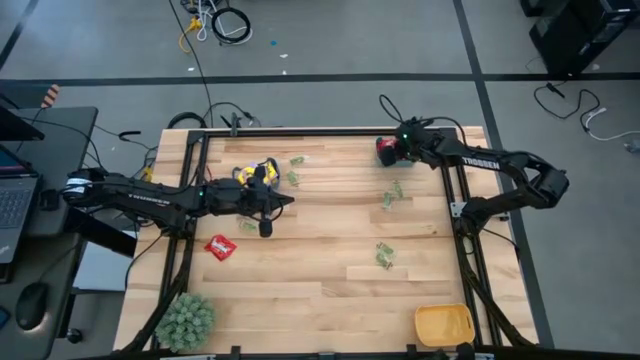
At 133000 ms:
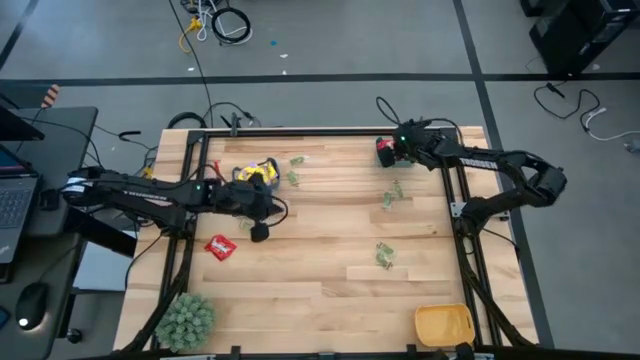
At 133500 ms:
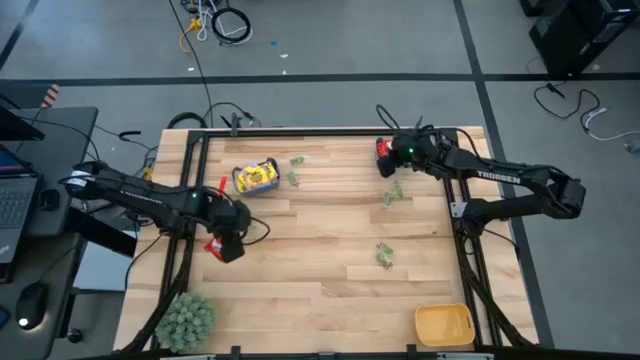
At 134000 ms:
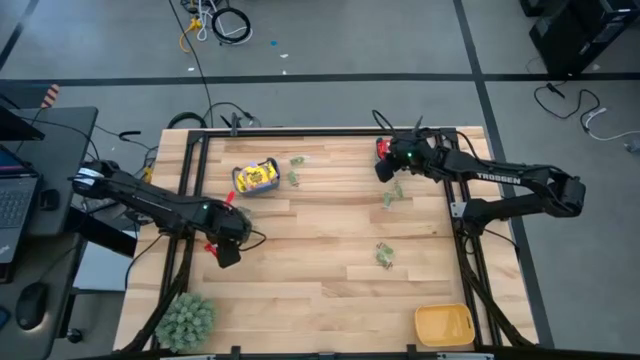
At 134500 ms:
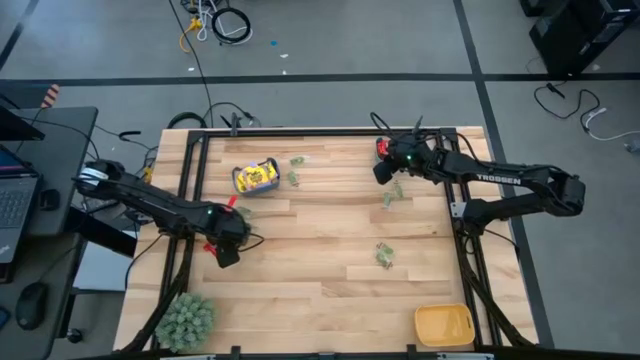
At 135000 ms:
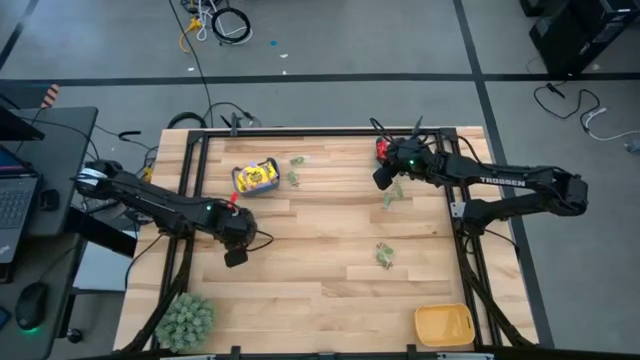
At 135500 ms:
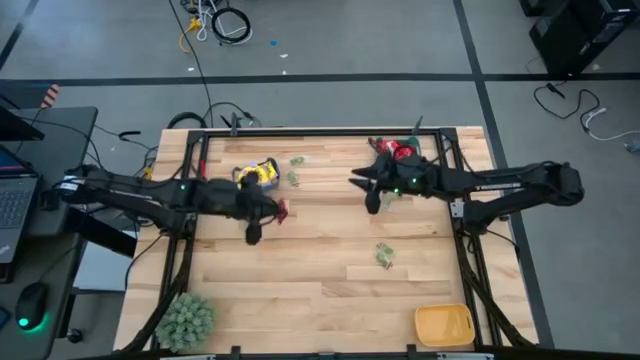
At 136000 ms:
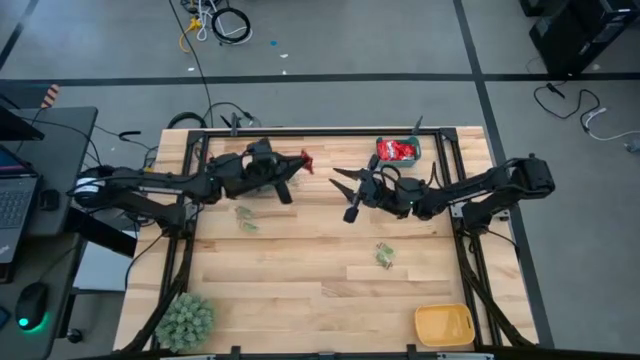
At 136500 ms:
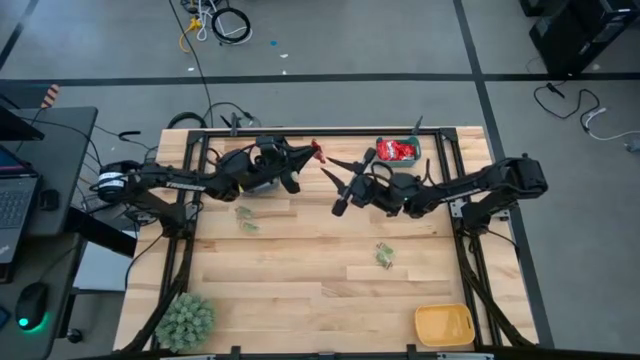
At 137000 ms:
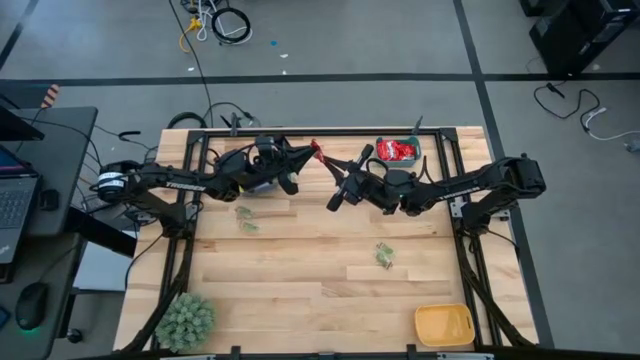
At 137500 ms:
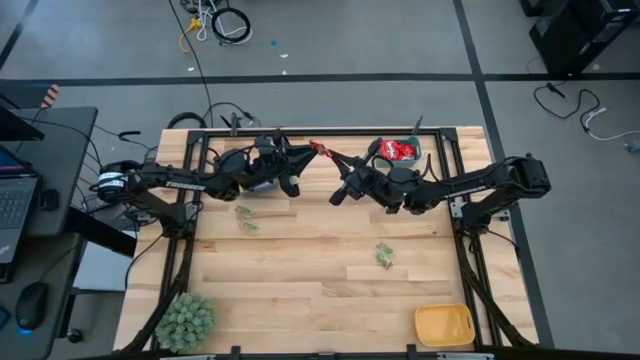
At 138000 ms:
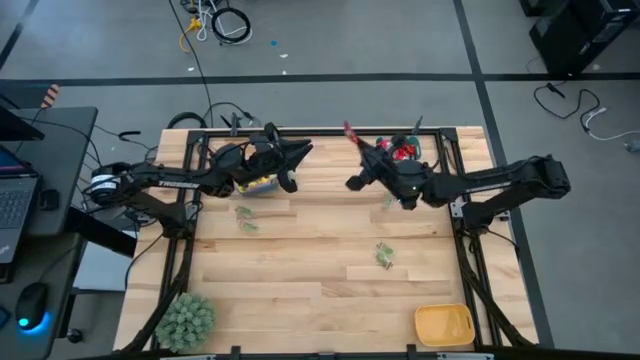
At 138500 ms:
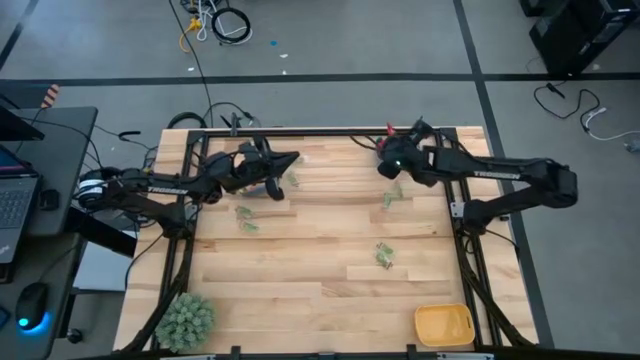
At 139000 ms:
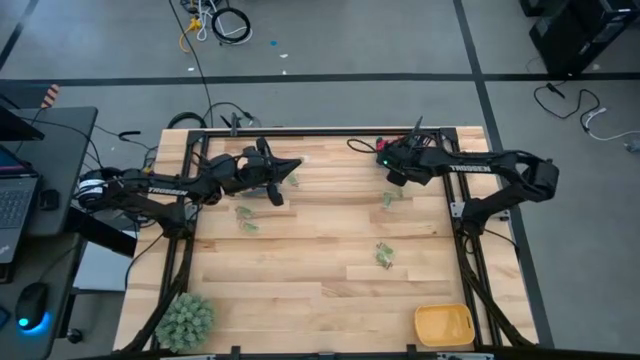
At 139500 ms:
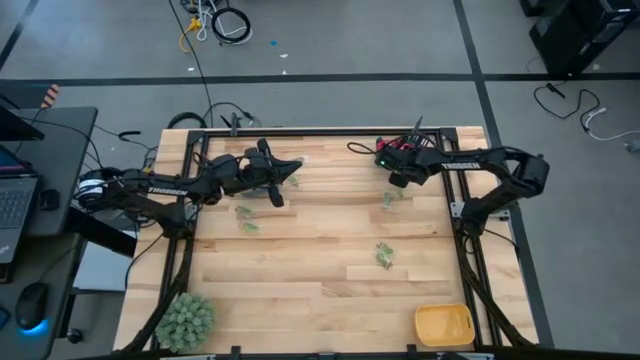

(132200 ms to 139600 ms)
Task: Sort candy
Put the red candy into the blue bin

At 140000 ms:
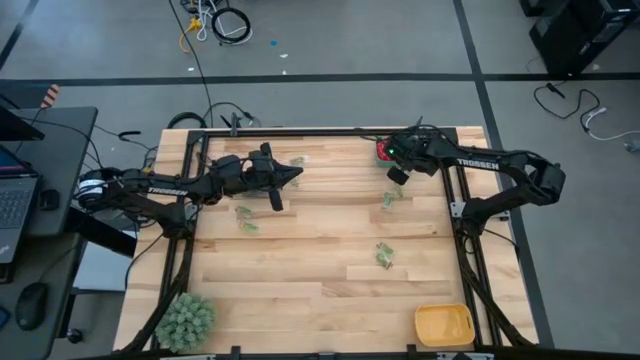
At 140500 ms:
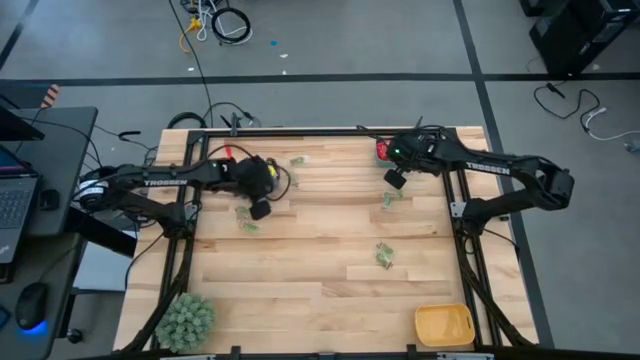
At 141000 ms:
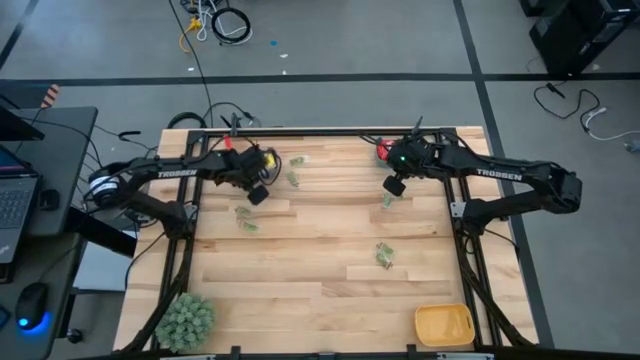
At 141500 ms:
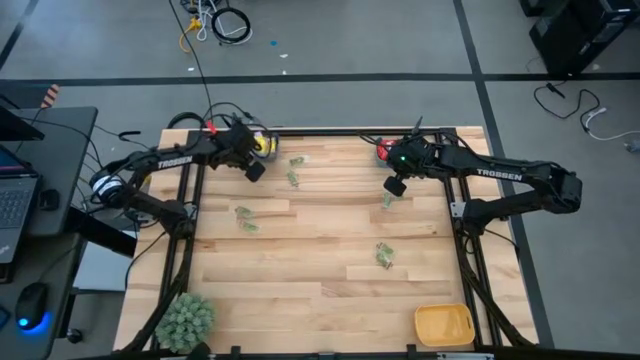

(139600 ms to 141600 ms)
Adjust the dark blue bin

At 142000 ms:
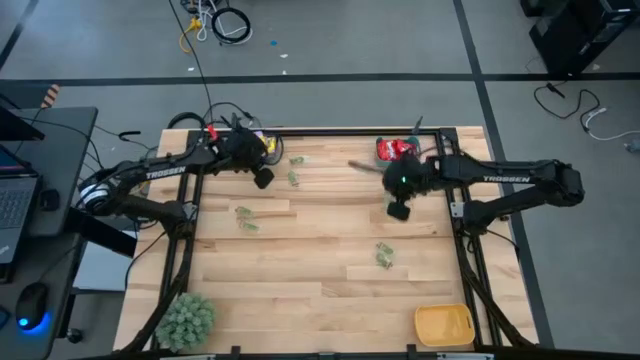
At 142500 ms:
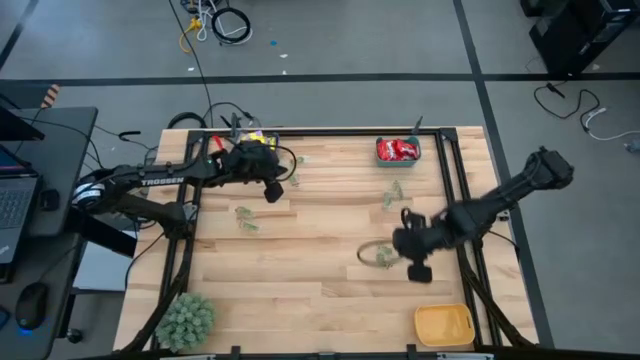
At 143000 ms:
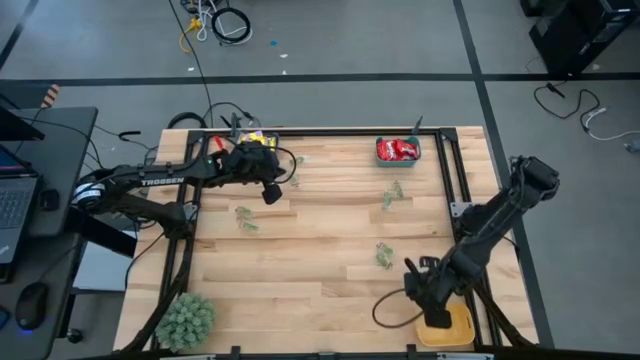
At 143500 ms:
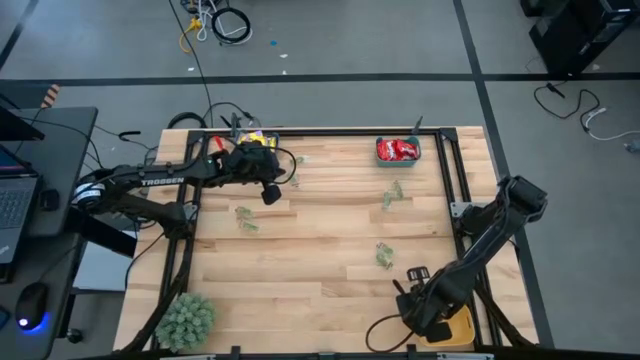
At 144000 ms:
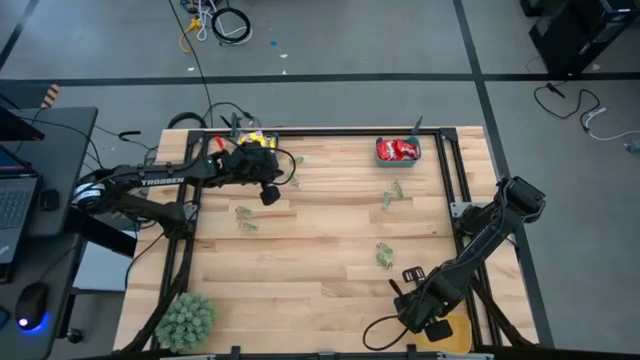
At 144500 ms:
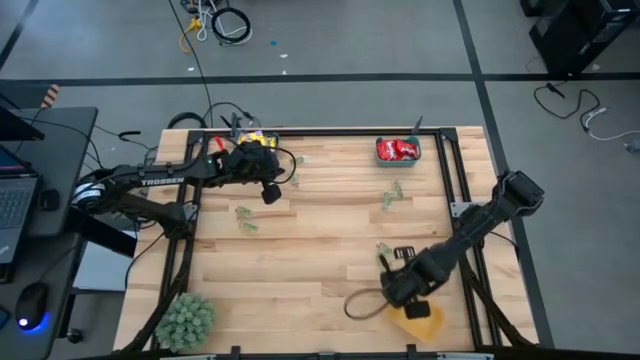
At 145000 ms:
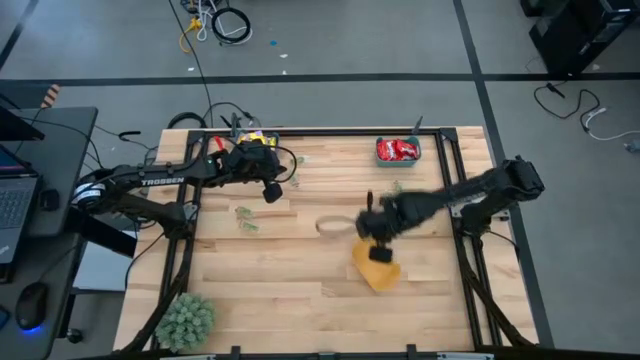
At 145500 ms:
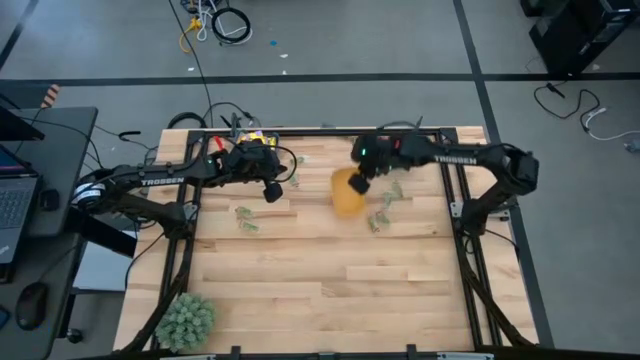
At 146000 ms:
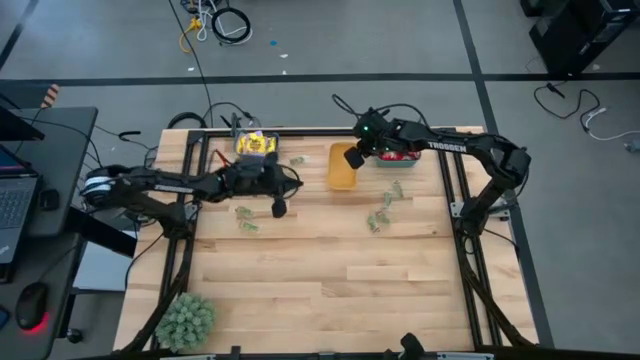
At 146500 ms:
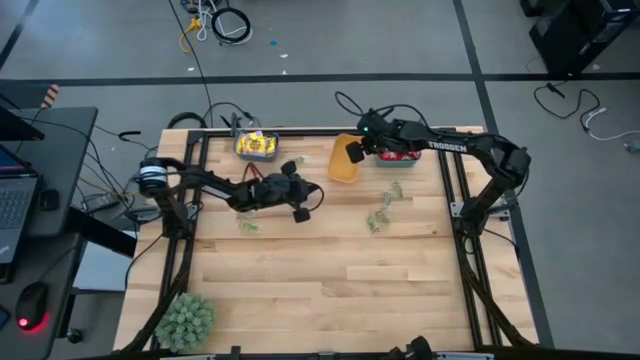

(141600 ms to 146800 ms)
Move the yellow bin from the bottom right corner to the top center of the table

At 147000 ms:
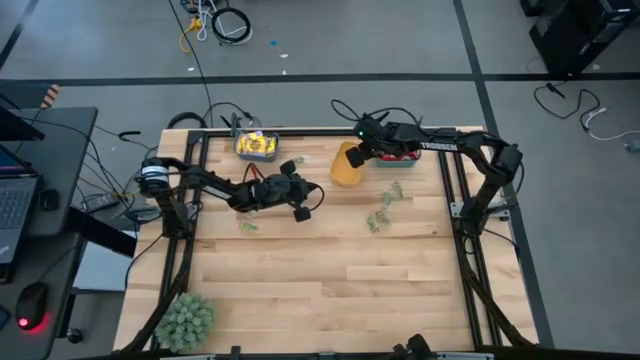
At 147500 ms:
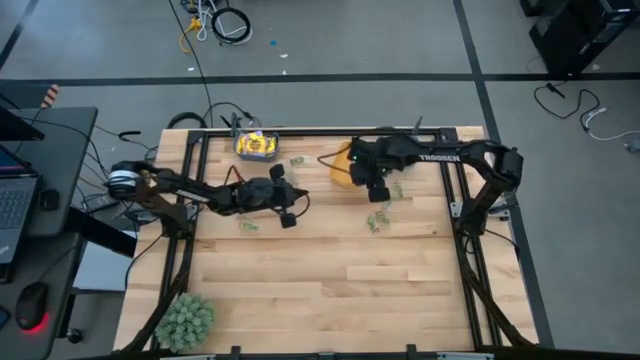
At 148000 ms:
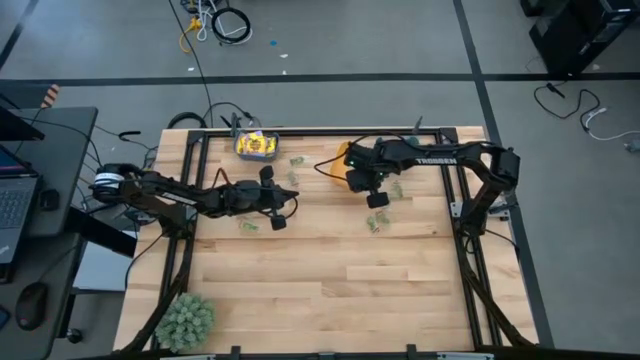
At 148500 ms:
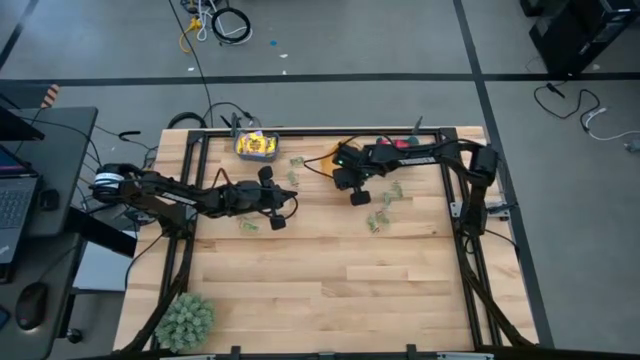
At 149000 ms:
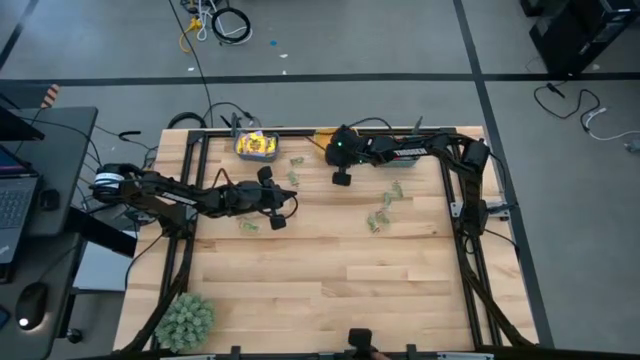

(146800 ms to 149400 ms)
Adjust the yellow bin

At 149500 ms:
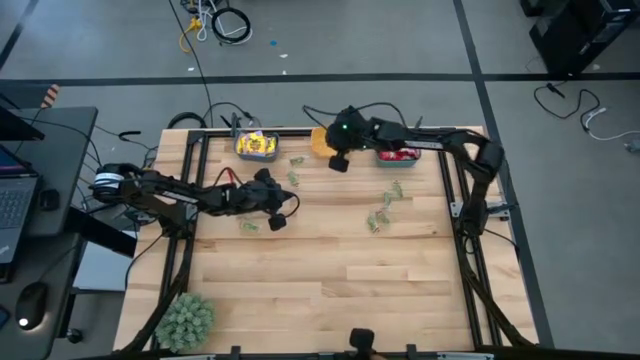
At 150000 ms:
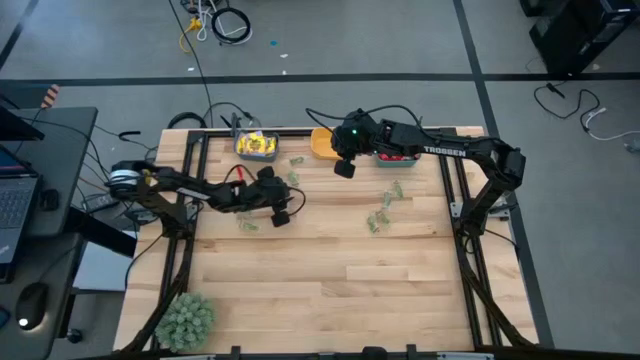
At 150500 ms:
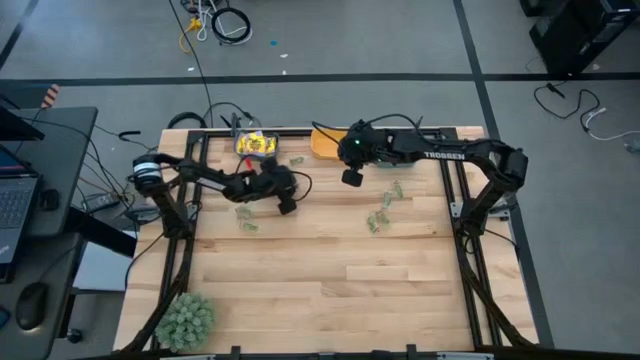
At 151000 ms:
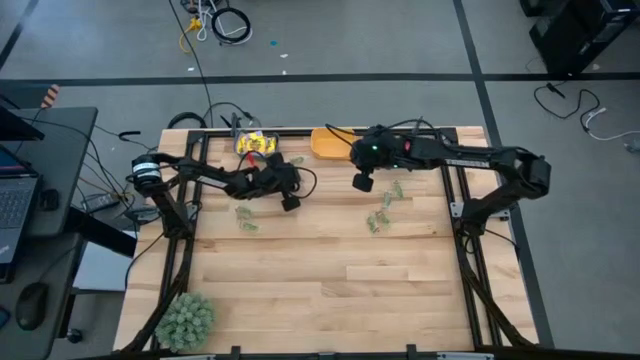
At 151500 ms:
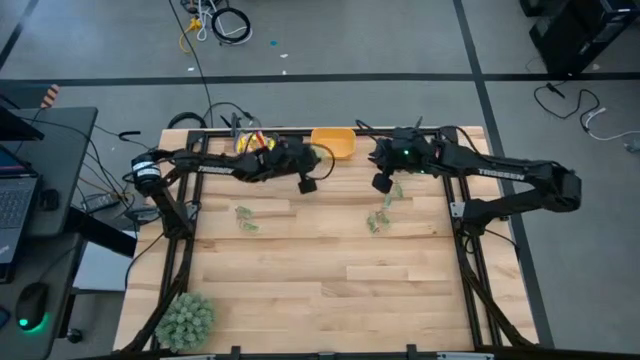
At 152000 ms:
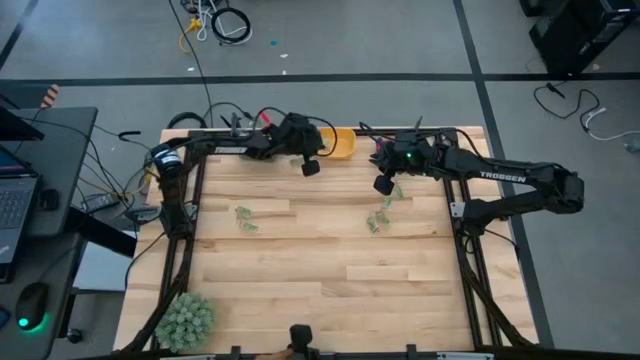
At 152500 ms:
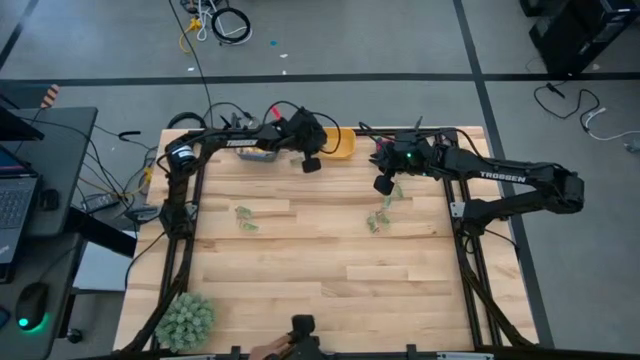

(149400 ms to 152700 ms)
Put the green gummy into the yellow bin

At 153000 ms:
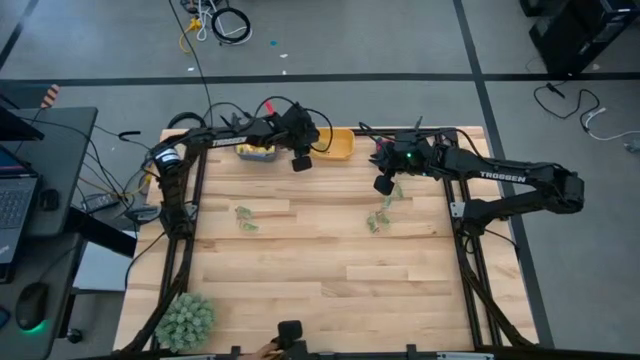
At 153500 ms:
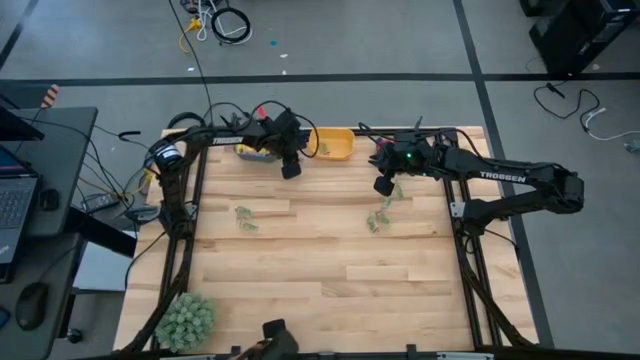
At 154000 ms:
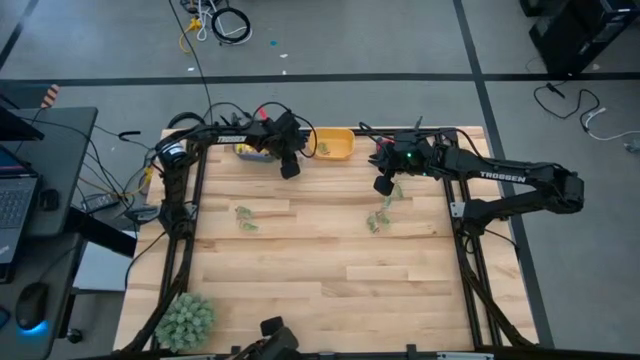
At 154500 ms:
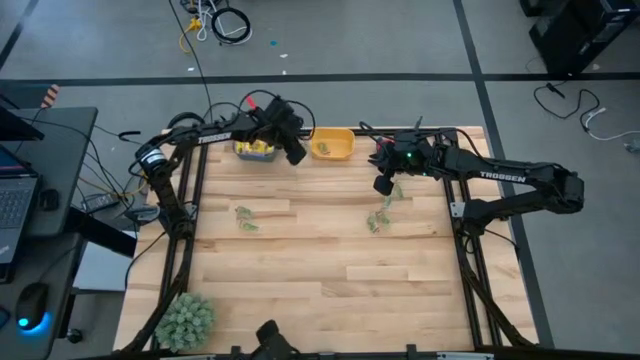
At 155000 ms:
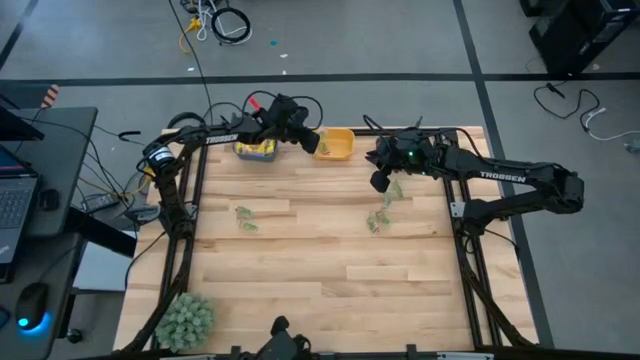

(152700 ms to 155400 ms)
Put the green gummy into the yellow bin
